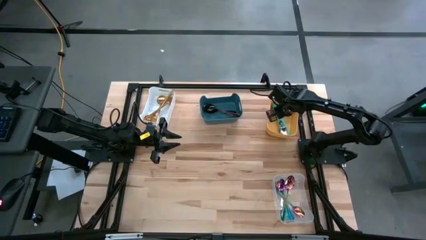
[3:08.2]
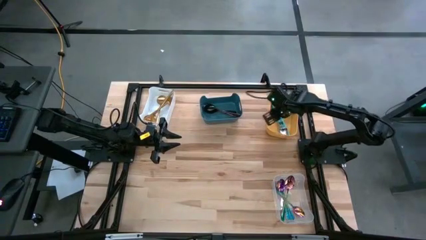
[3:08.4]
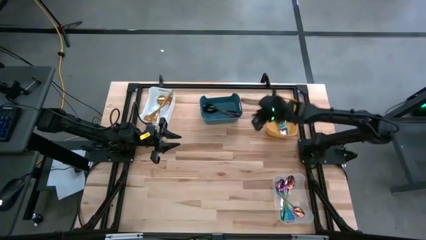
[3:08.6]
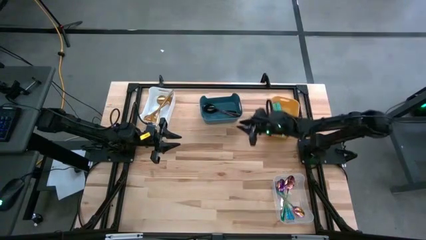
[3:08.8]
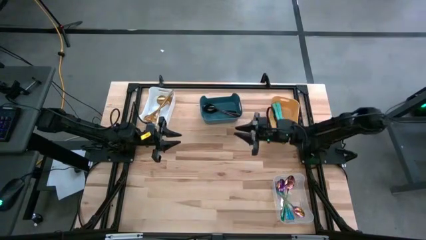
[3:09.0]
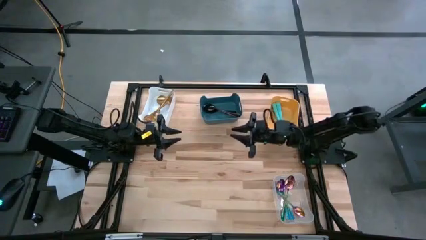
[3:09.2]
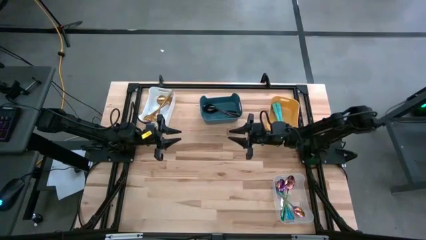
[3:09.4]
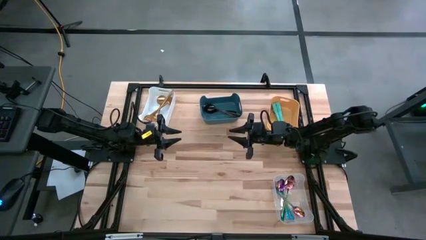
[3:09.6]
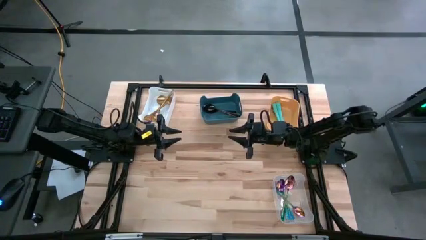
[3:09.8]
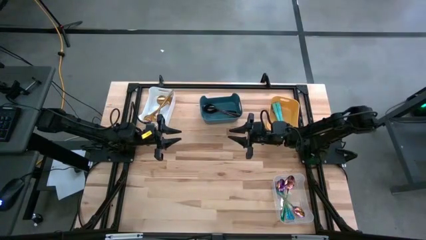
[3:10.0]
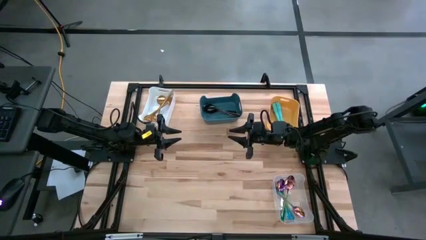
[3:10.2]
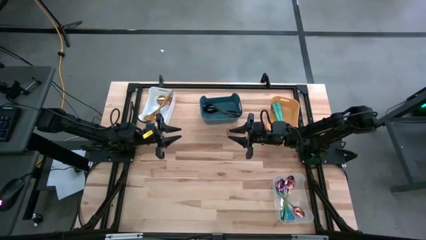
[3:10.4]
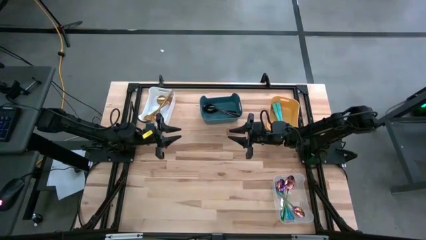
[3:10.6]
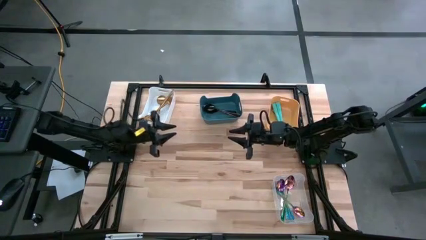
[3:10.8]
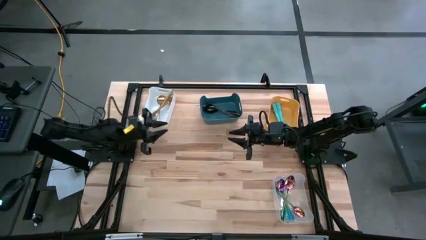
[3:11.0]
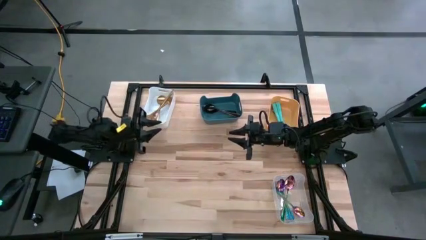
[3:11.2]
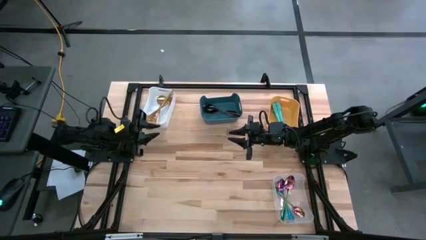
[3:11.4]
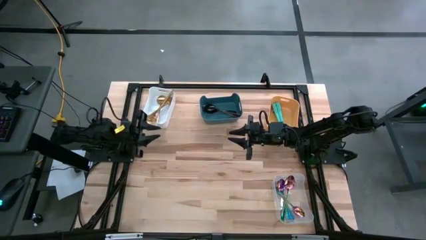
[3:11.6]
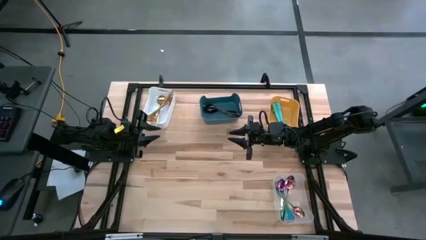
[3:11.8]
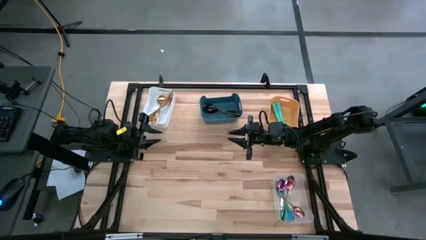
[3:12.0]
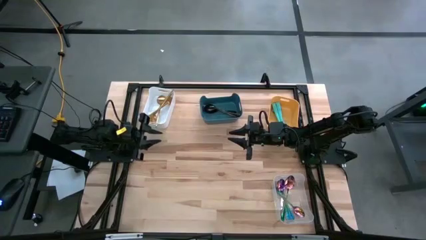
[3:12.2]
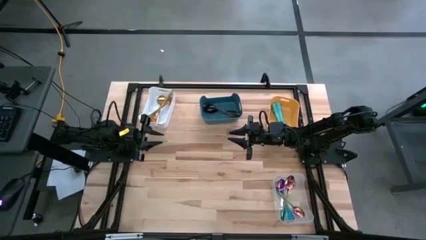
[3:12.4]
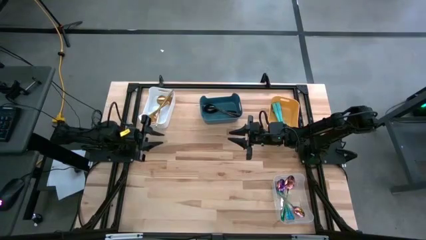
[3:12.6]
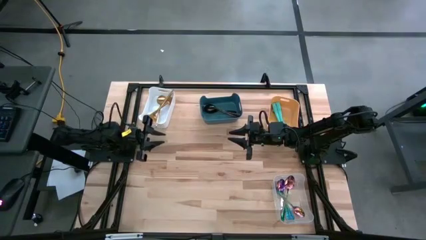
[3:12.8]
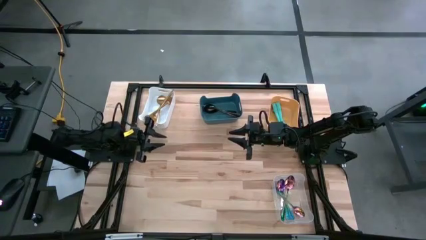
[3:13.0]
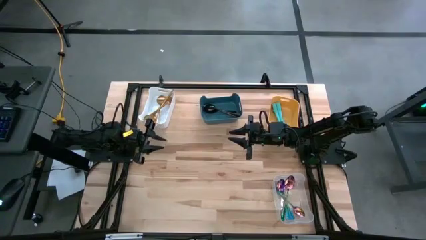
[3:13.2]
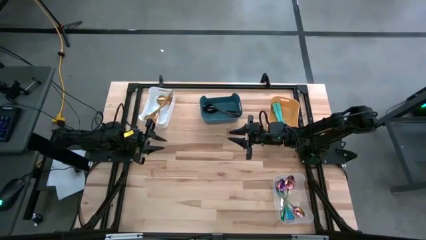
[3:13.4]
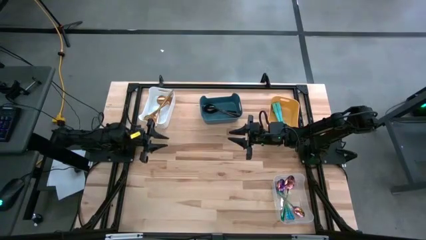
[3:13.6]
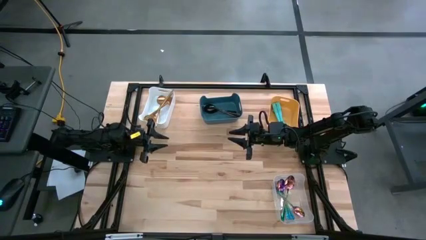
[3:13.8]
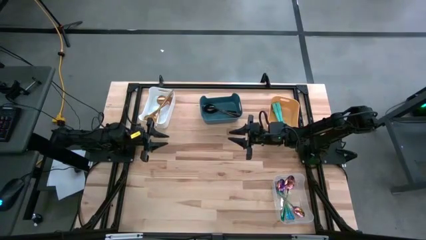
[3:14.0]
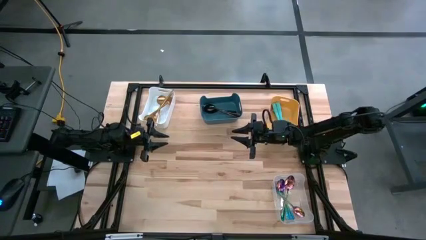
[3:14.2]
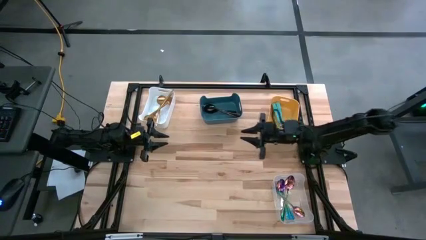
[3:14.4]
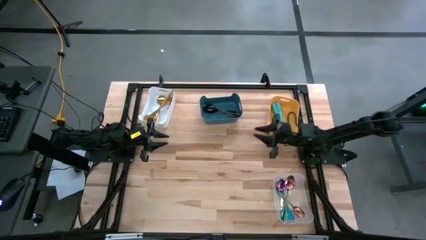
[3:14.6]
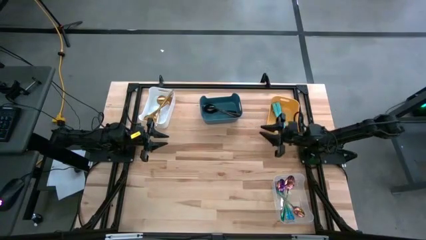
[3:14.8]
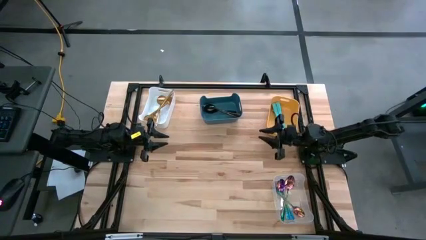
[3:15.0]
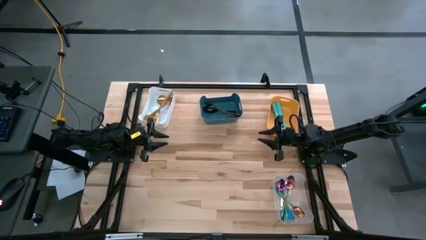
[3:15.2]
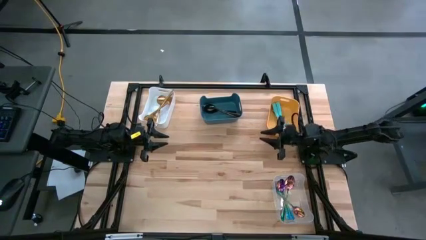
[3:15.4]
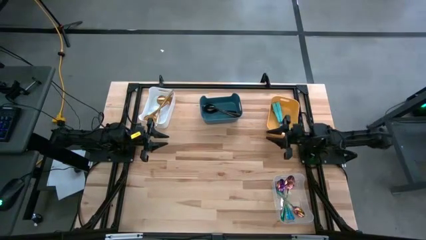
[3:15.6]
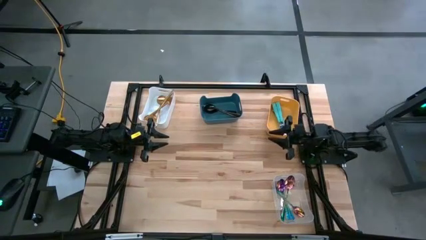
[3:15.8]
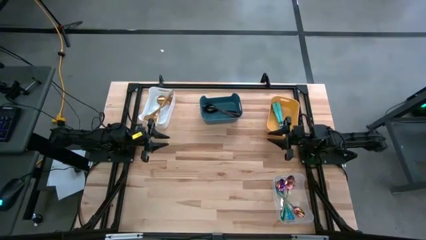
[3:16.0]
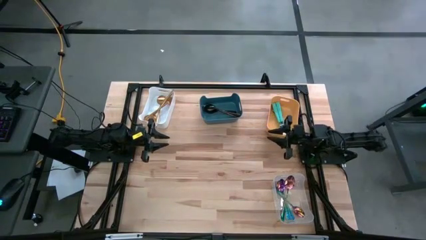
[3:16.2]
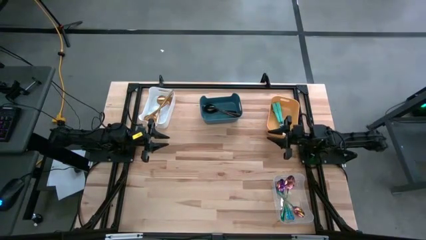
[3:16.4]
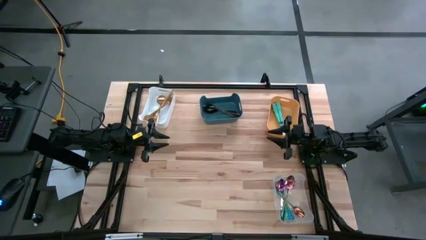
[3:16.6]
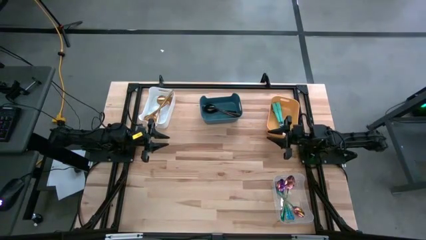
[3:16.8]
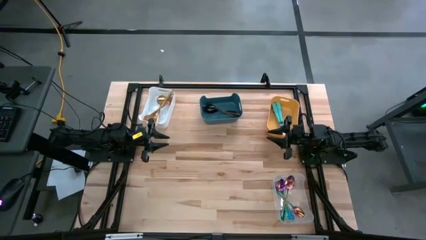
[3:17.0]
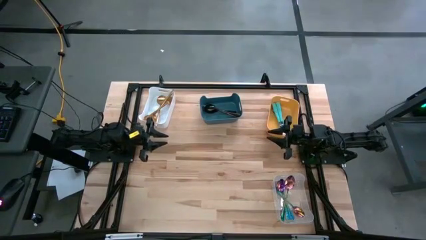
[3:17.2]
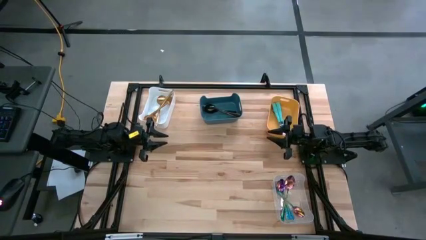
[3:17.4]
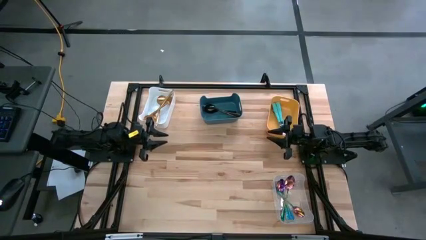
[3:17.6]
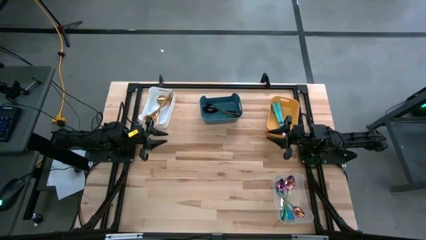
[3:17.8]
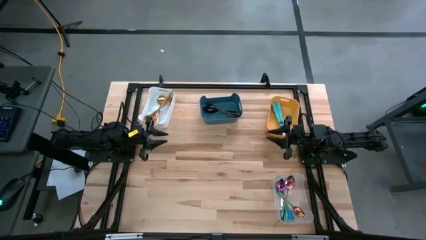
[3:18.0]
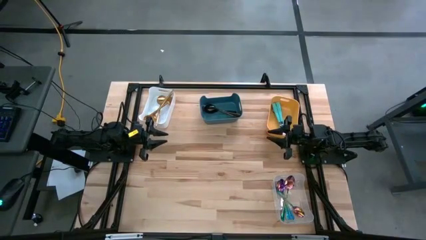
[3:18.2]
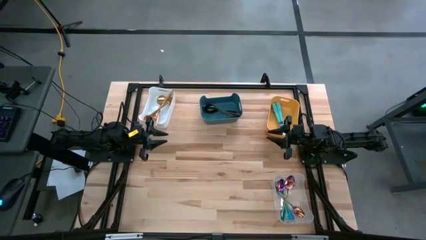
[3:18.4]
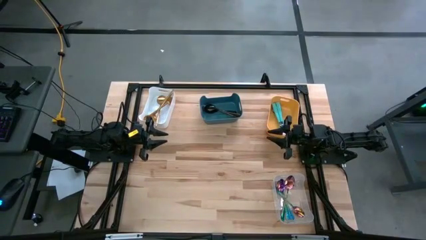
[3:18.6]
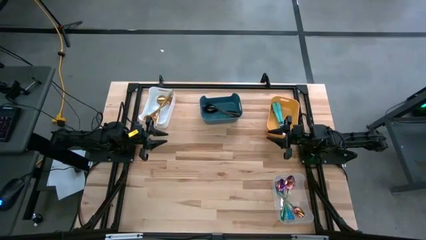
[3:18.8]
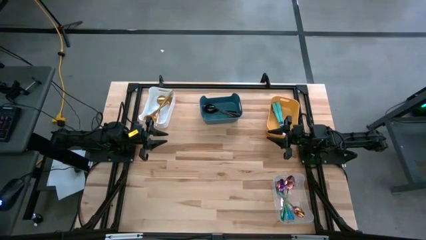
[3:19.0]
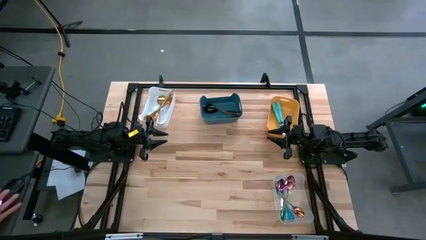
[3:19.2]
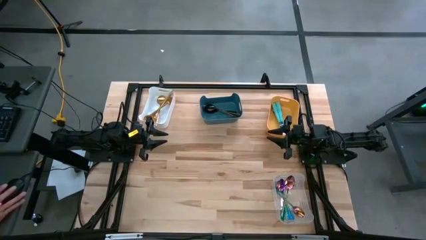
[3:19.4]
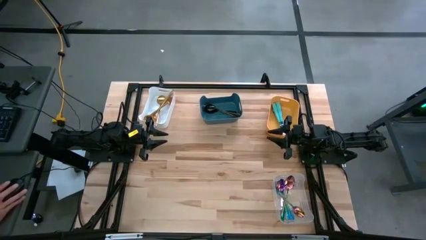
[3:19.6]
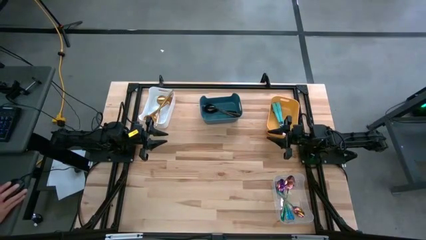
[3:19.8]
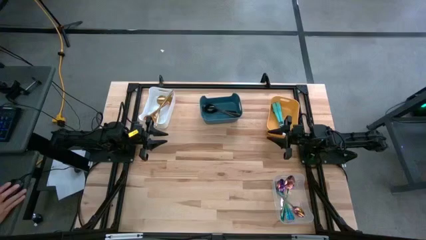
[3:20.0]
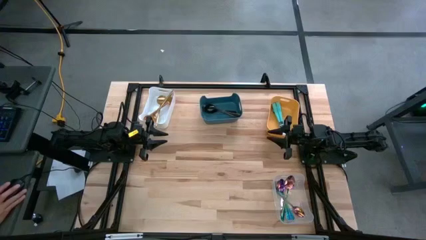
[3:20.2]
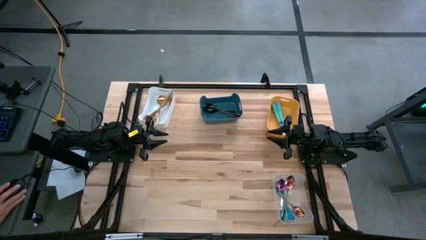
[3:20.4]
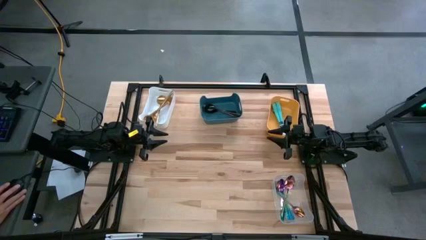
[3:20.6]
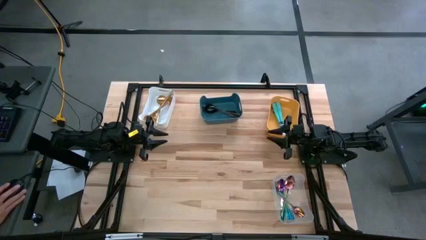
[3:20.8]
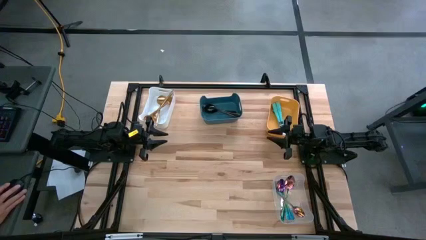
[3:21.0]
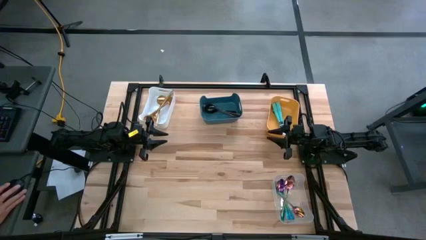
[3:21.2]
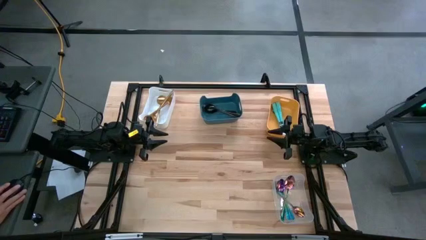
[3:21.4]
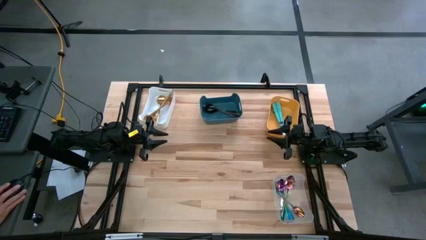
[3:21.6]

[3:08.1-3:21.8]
Task: Sort silverware by color (type)
Return to Home Position
